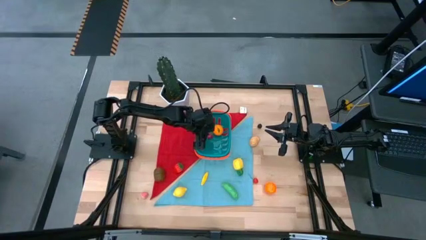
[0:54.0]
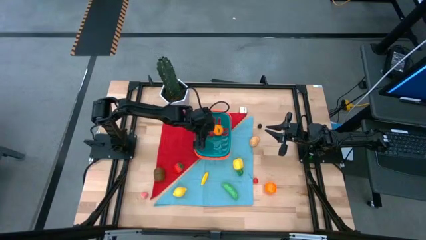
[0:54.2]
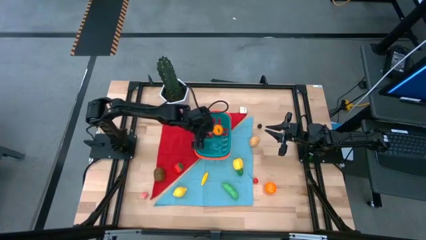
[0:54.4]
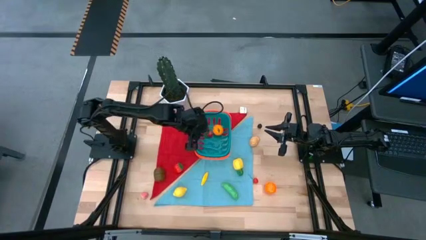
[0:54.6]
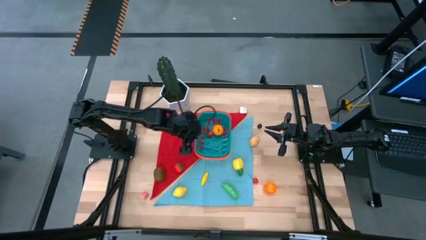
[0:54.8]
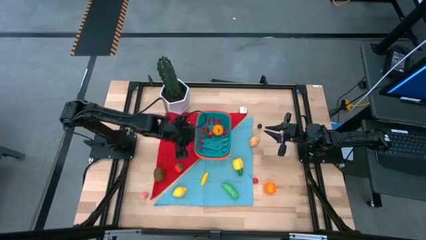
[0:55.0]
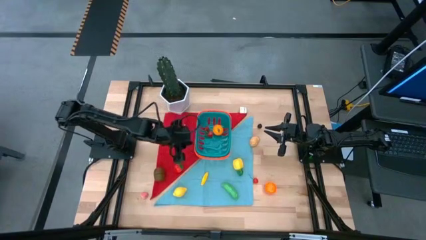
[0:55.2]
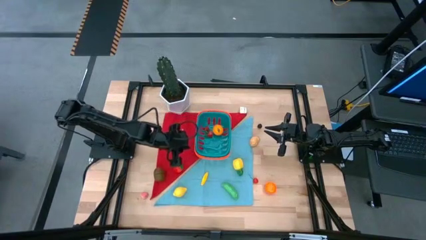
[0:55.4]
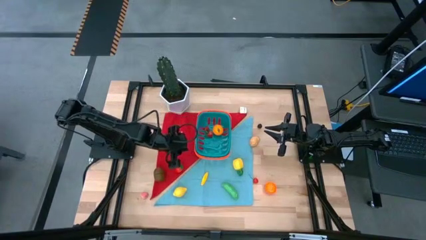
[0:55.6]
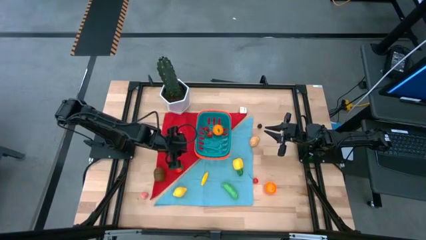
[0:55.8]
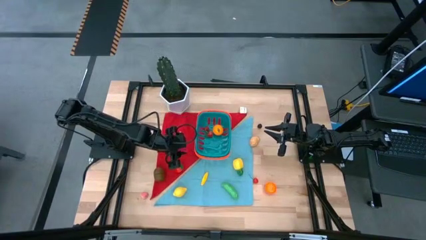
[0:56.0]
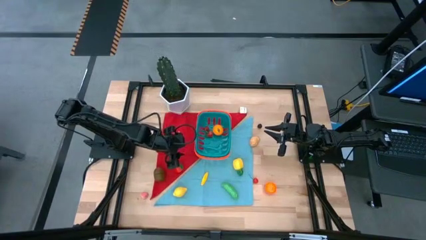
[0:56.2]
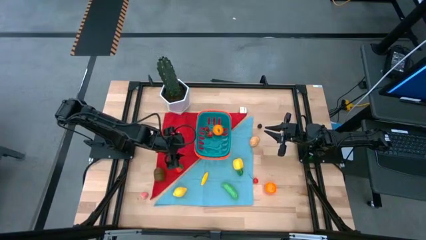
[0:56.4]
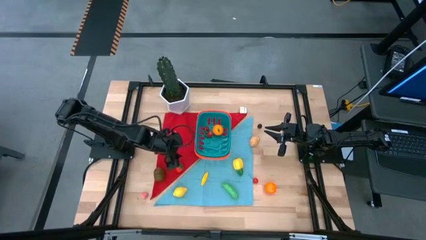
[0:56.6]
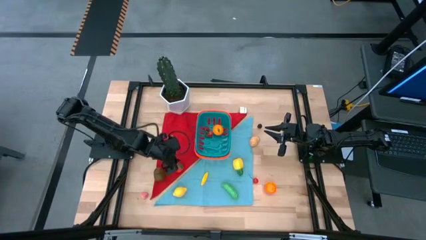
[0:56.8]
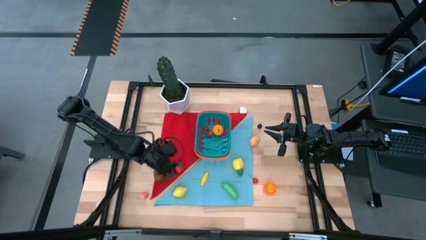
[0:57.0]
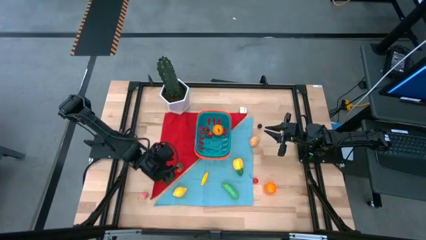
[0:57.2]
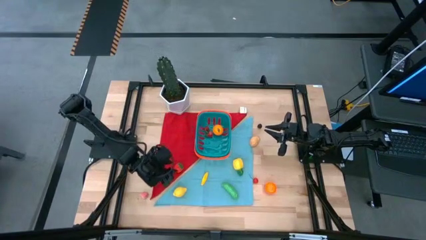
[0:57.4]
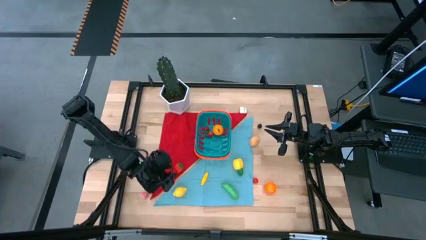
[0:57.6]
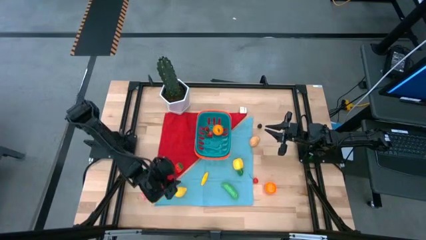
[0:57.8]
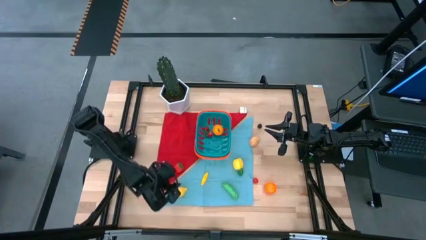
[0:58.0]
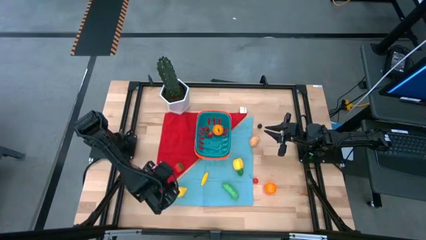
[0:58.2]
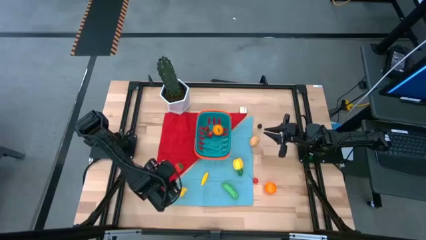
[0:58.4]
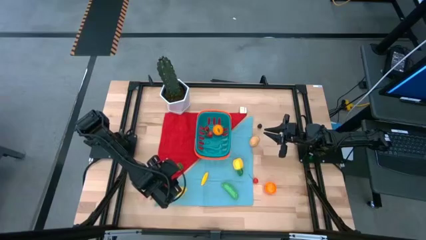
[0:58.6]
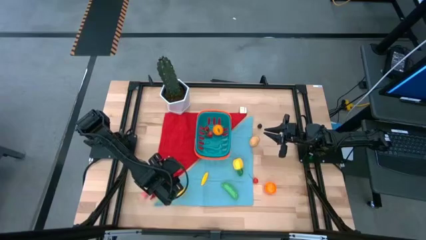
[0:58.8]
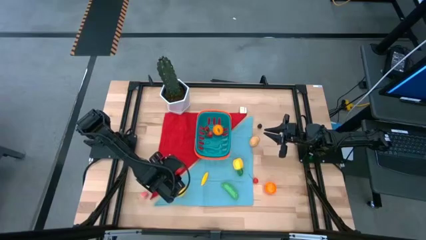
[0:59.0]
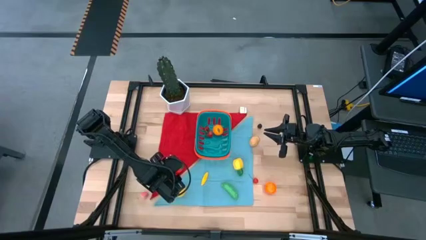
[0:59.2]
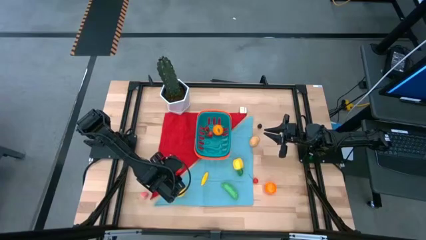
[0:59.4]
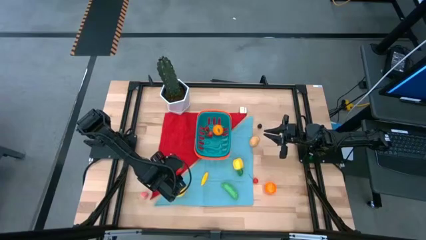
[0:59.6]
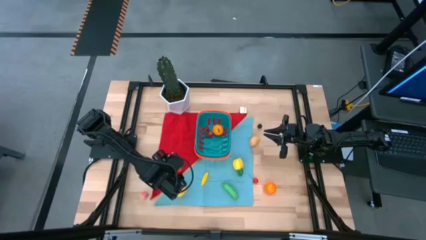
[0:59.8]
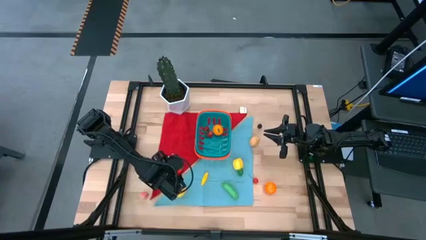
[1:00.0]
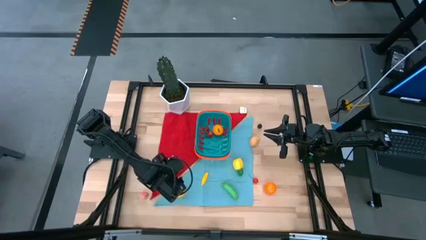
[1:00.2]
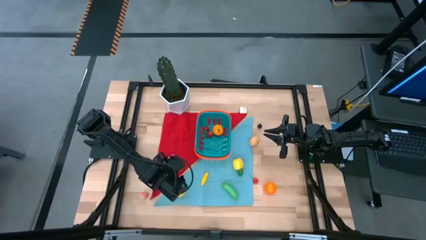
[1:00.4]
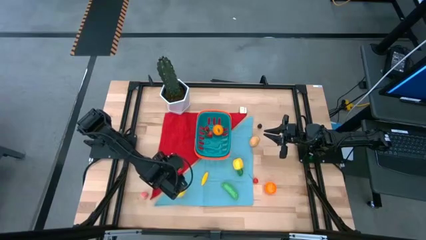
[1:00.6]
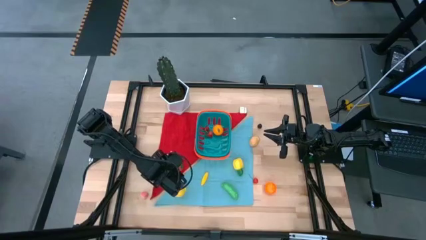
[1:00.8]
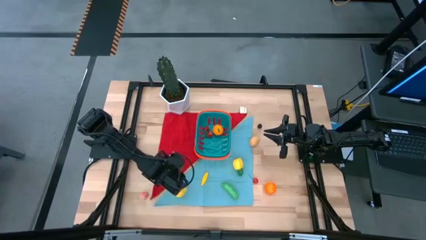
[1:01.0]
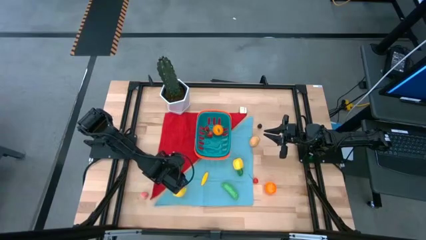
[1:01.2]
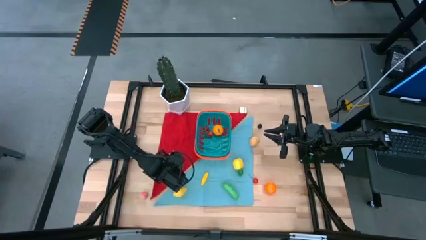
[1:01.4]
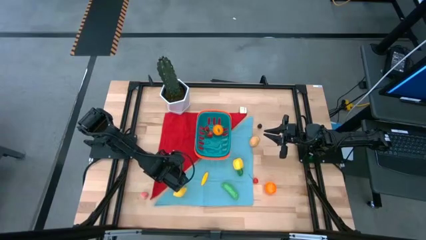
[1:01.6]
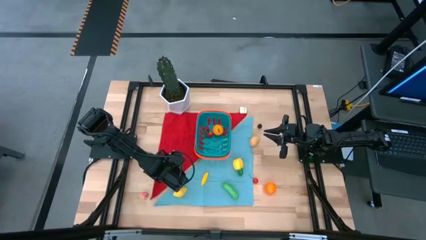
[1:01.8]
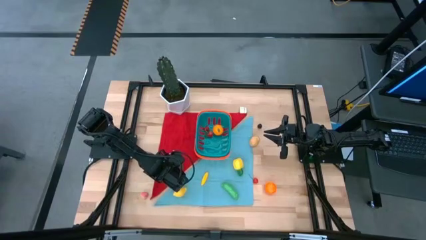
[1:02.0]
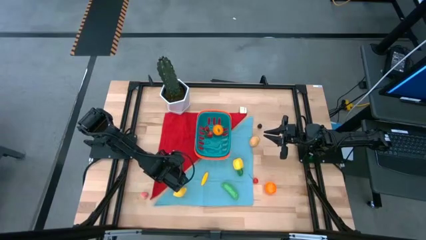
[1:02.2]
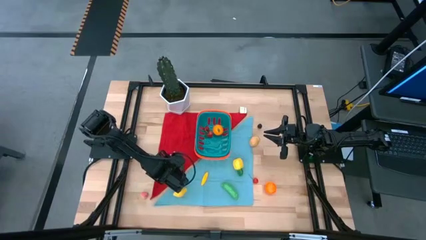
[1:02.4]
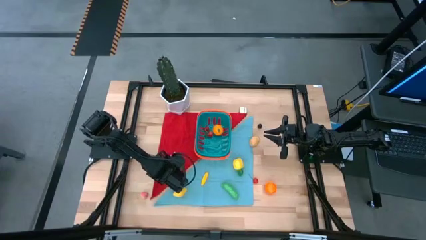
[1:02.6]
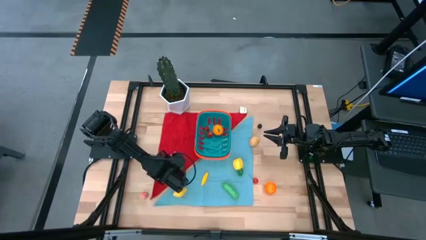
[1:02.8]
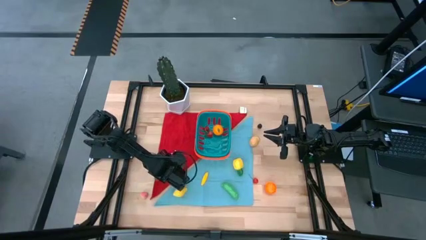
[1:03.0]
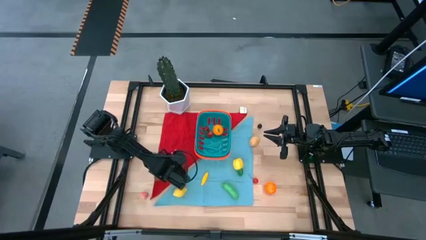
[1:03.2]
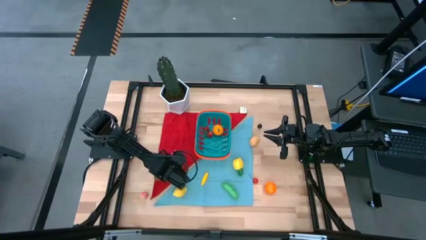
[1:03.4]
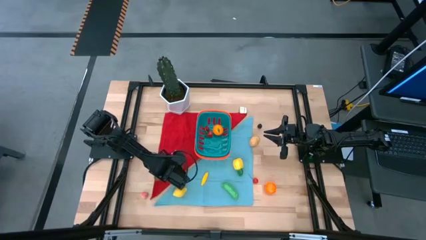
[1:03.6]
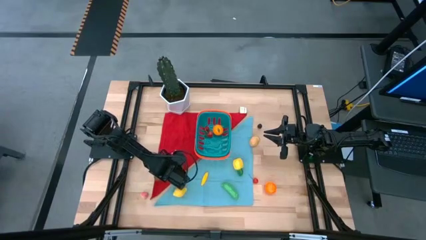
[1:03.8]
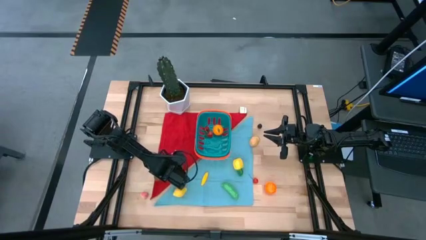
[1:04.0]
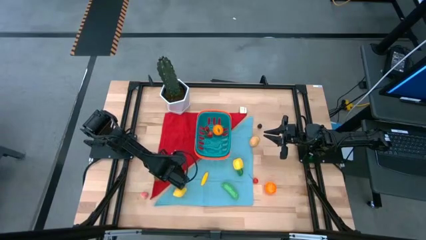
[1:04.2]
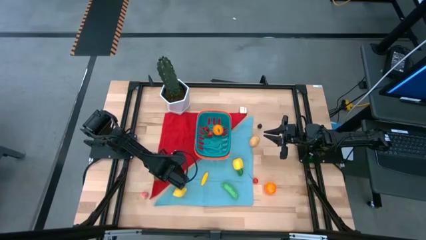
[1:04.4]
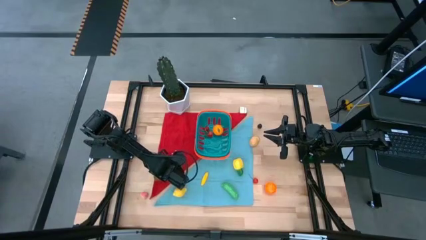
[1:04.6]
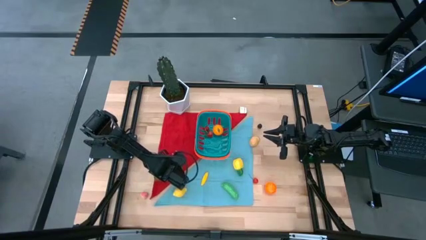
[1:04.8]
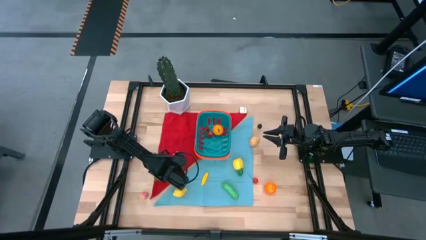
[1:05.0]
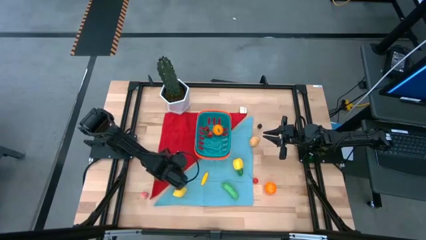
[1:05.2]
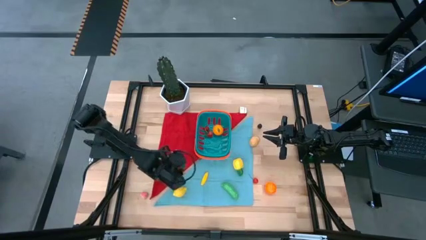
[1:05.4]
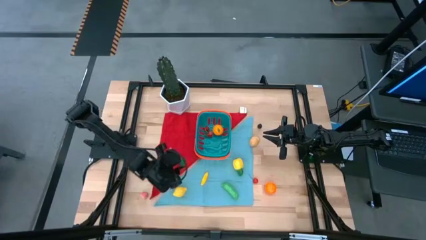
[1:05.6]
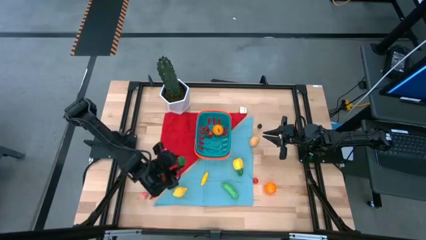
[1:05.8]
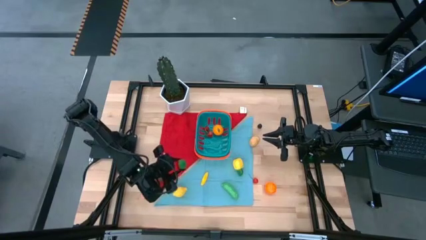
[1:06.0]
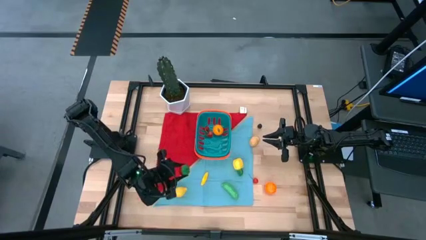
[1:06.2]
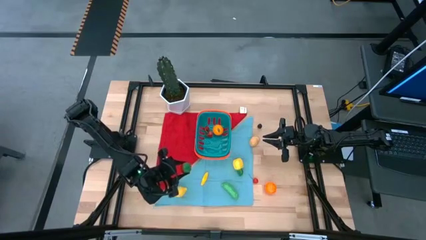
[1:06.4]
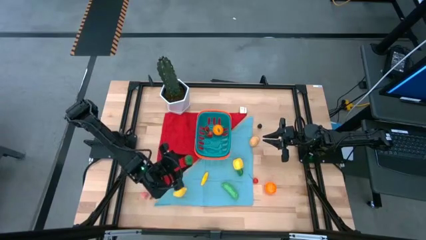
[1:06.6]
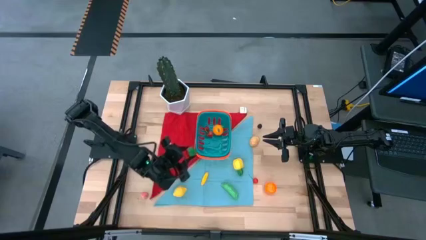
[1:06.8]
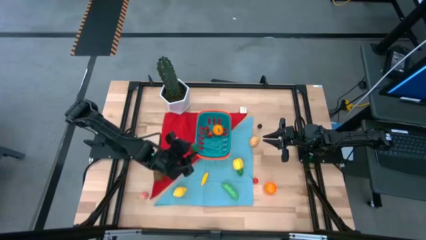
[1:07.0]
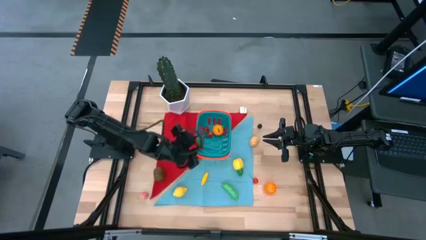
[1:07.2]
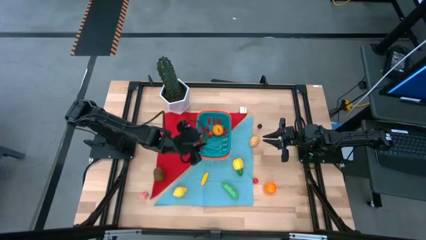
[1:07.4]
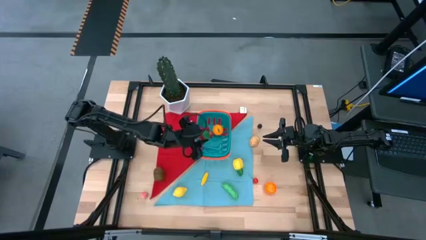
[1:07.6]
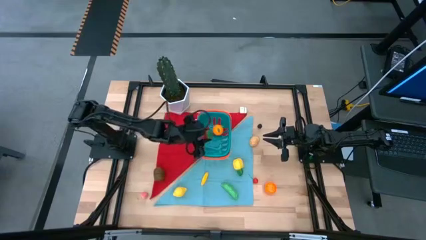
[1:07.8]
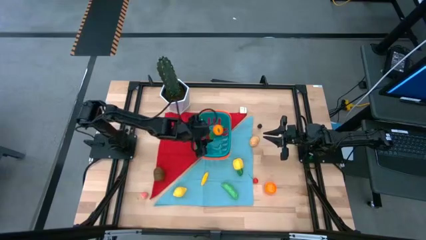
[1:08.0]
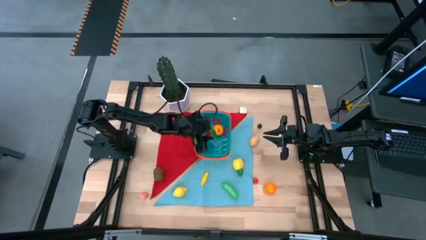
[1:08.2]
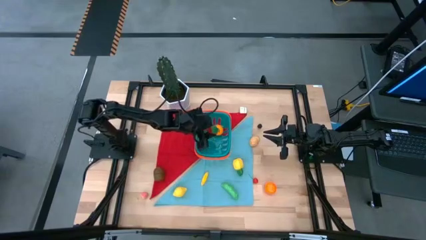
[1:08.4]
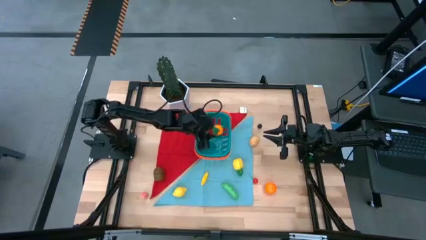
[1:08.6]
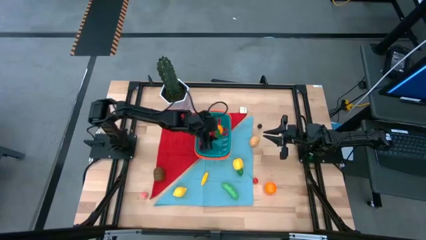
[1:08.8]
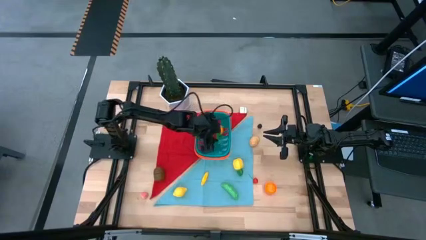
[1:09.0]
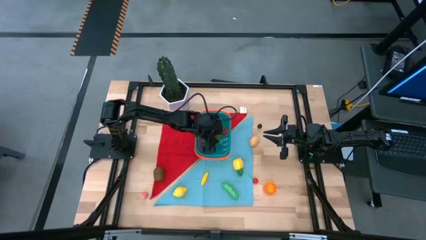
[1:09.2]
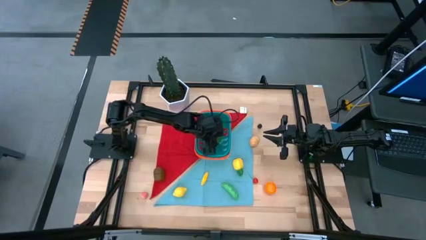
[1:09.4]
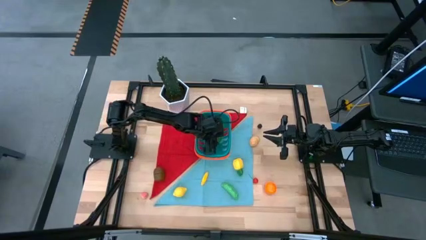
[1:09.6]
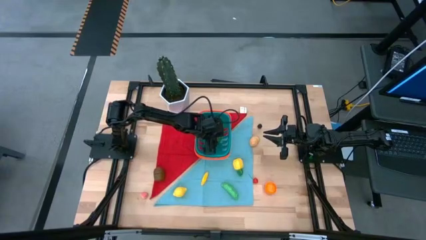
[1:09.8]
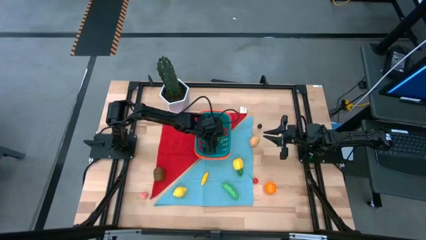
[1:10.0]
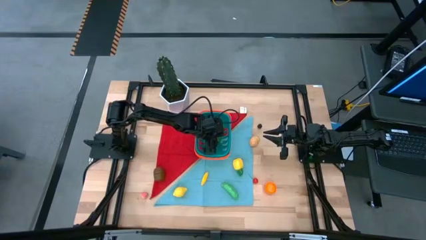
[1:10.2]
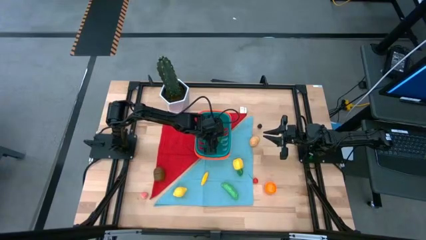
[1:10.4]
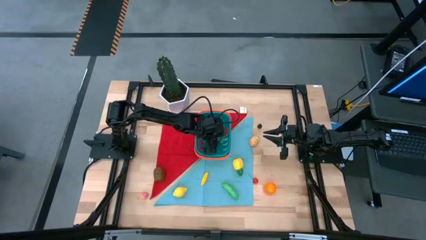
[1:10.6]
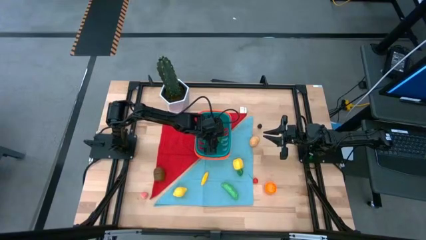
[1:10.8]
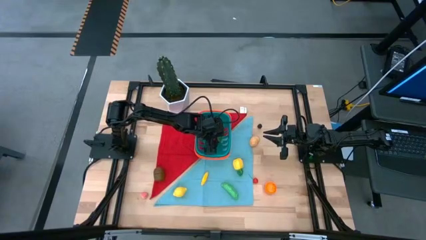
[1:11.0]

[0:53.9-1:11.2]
Task: Pick and placing Produce into tupperware
Put the strawberry into the basket
